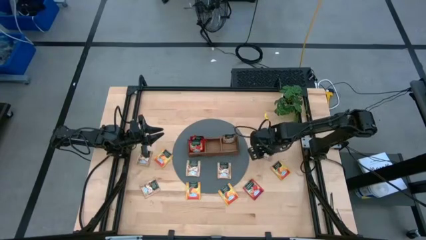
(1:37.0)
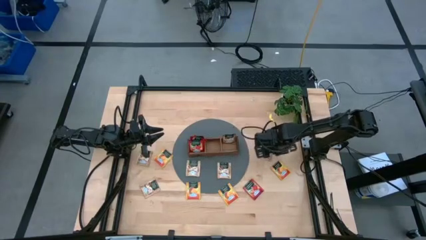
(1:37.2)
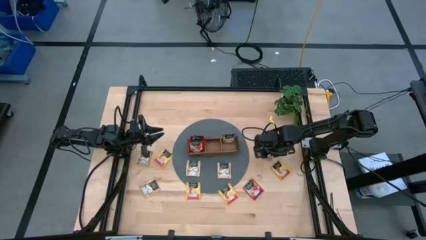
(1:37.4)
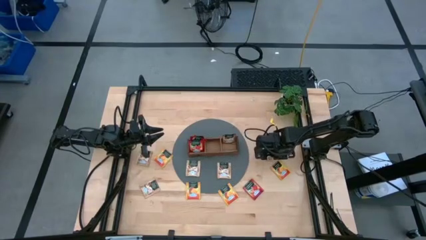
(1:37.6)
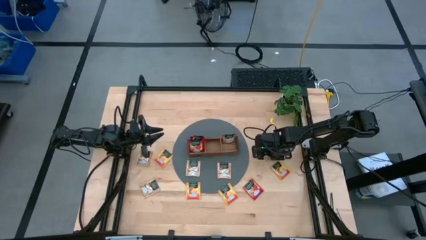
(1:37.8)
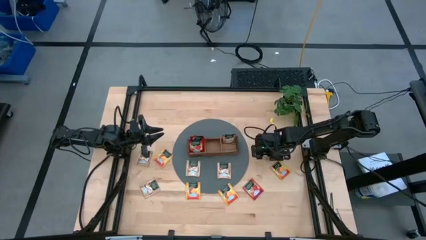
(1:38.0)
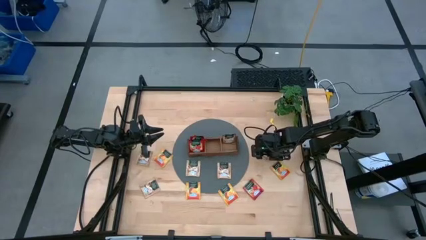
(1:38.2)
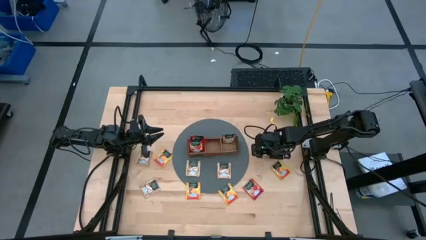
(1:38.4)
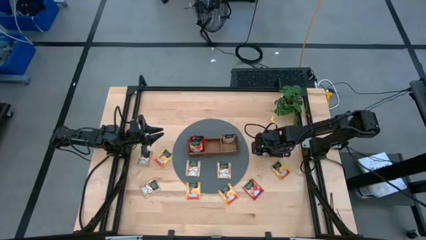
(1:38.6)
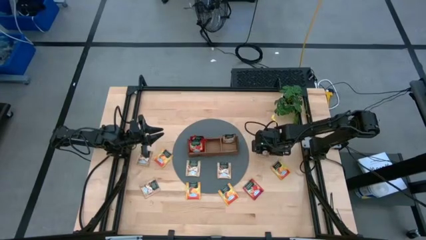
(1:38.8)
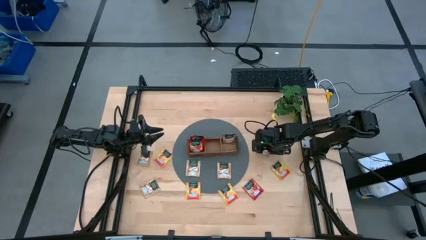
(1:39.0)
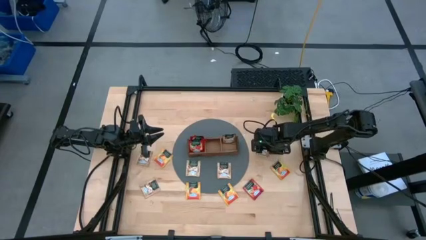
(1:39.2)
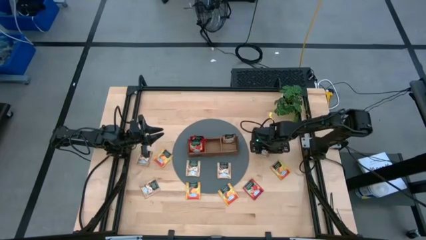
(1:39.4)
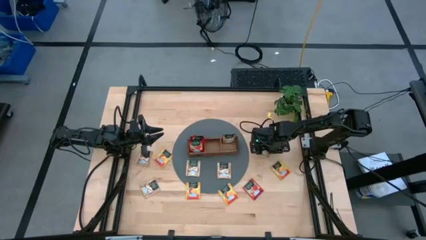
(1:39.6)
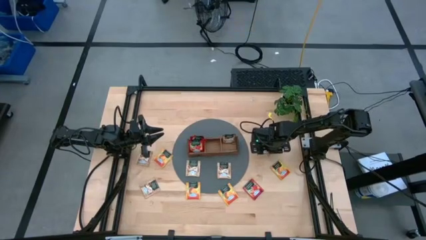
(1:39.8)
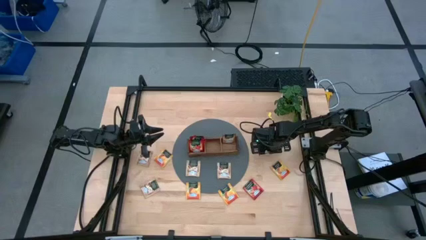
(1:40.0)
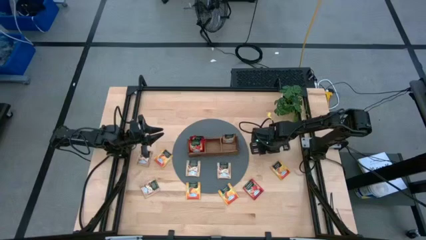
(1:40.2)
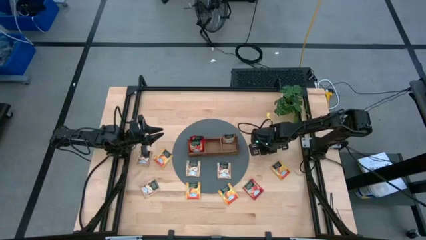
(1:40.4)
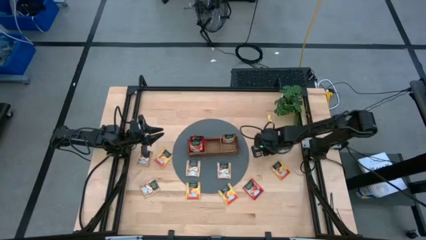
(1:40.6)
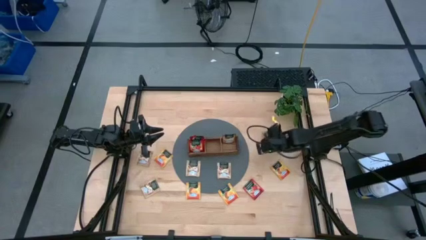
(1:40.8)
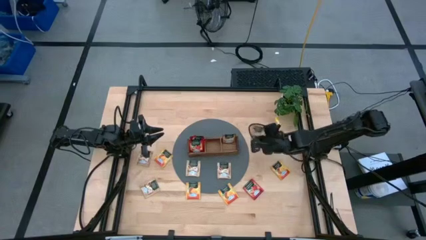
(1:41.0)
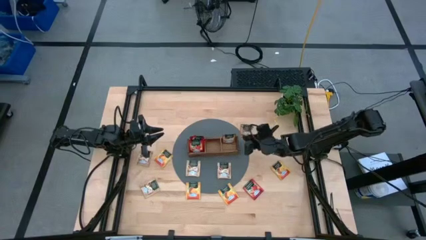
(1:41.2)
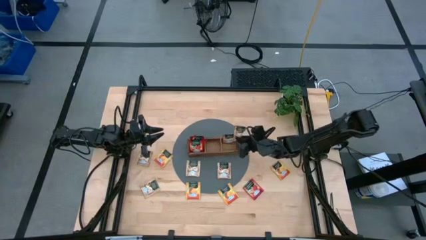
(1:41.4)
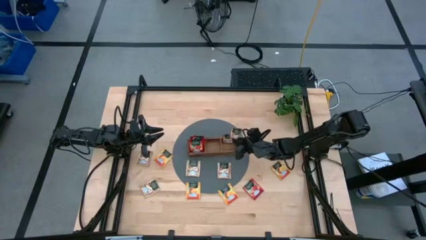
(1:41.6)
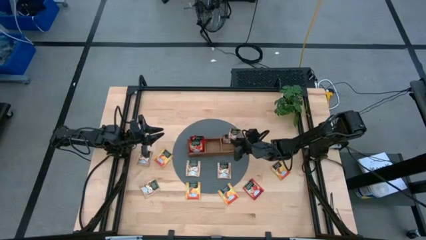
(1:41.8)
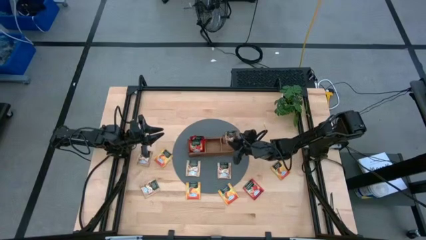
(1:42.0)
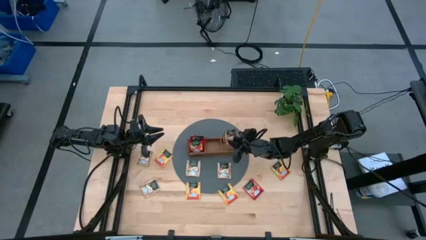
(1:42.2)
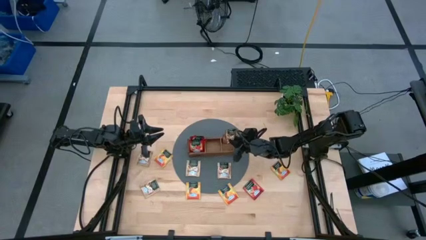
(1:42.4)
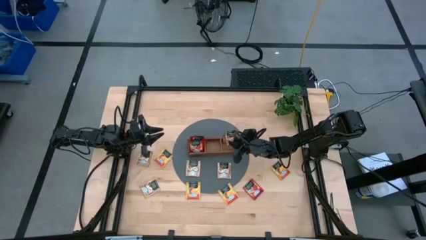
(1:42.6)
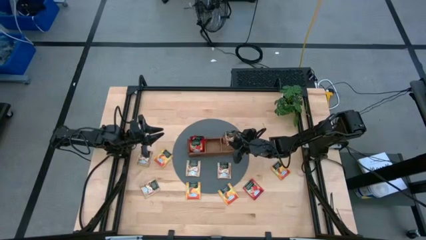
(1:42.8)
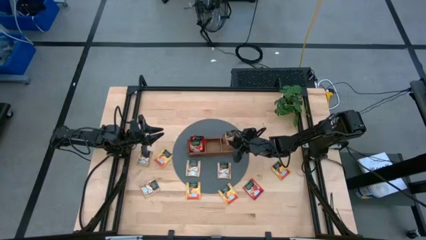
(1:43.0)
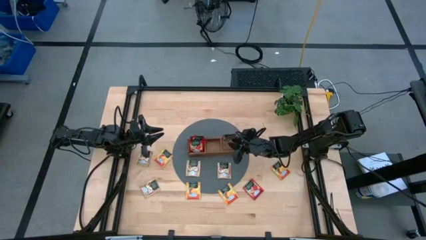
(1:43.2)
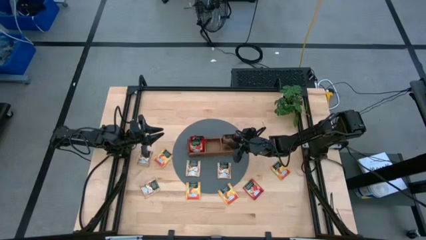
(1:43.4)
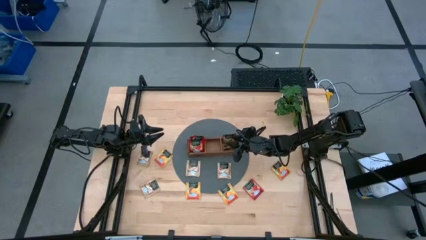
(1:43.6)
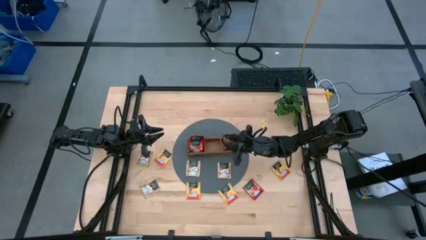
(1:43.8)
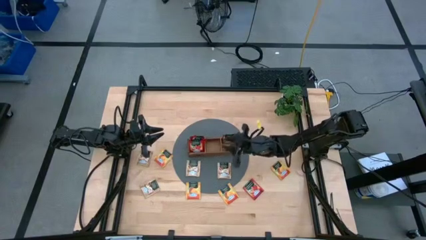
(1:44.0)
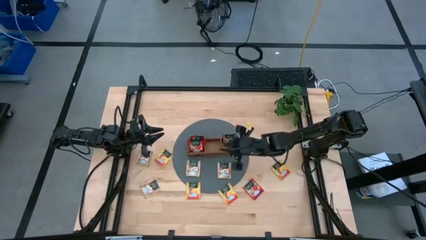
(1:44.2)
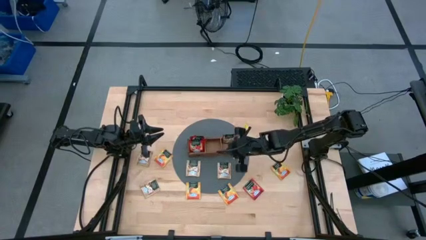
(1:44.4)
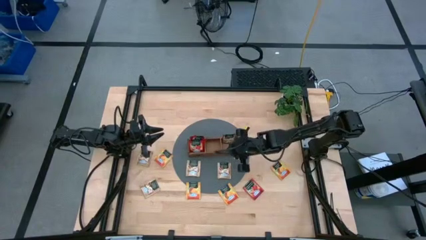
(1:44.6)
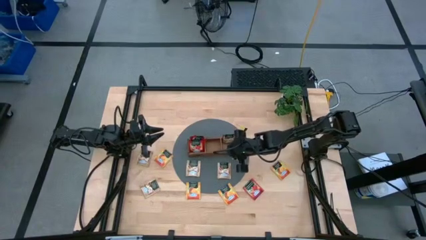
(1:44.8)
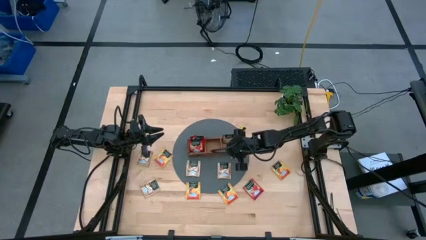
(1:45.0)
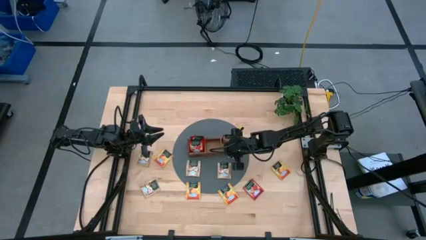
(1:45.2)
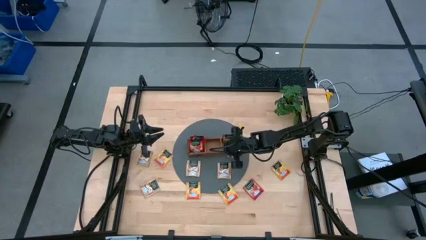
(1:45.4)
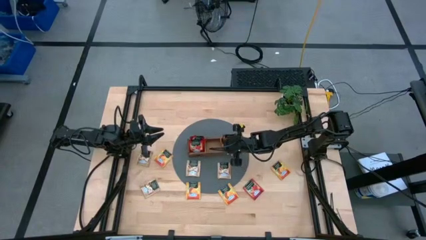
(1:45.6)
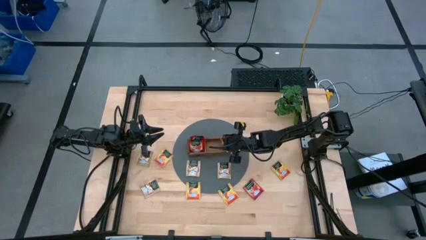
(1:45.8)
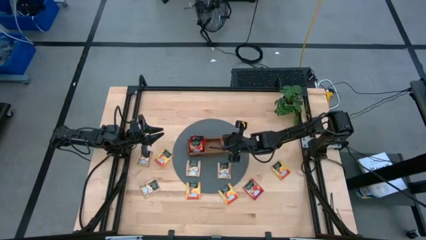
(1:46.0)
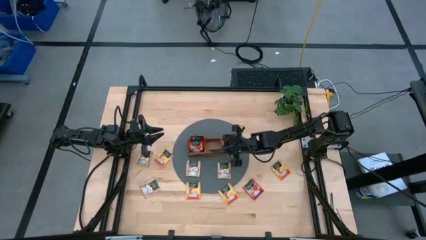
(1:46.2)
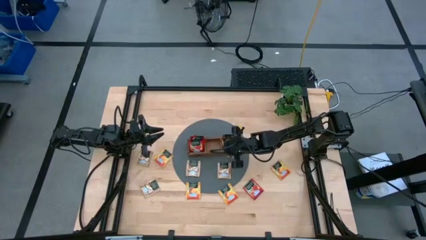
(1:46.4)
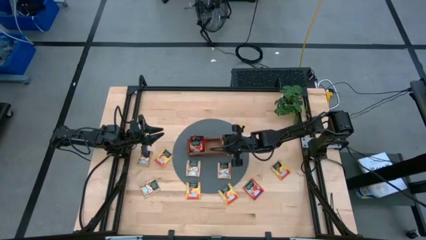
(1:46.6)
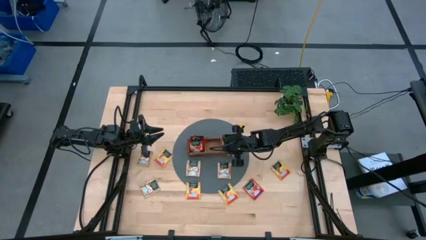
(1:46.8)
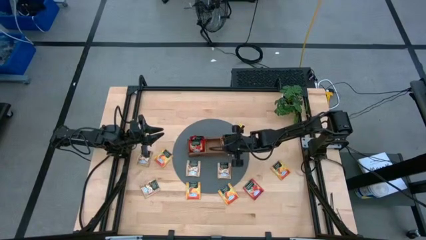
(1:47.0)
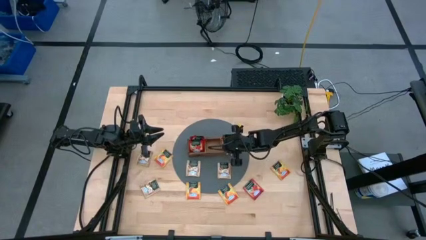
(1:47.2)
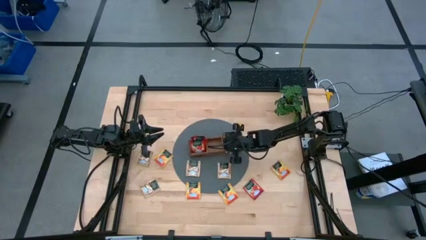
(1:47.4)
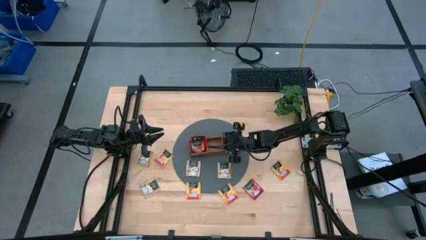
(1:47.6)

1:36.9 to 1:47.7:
Task: Pick & Place Tea
Put the yellow tea bag into the right section of the wooden organizer

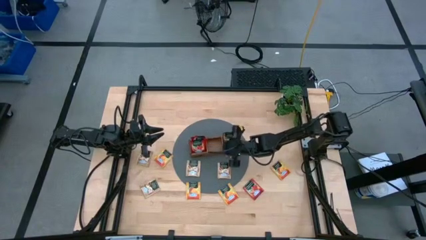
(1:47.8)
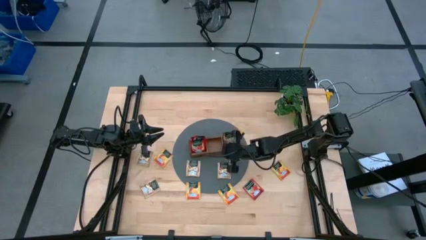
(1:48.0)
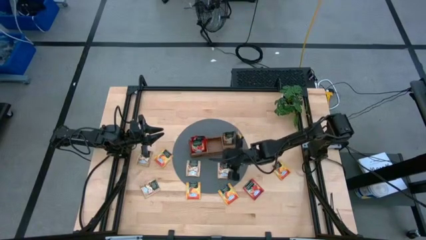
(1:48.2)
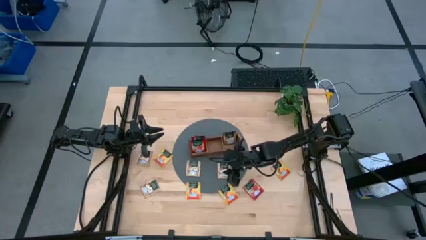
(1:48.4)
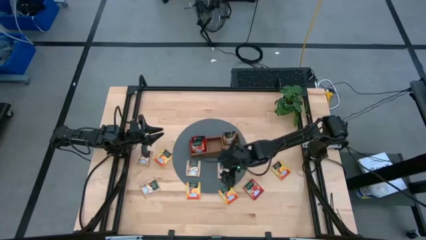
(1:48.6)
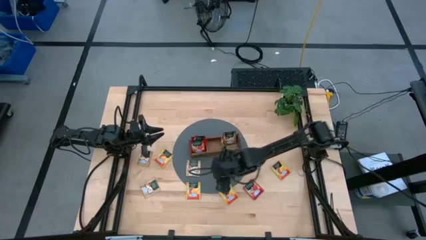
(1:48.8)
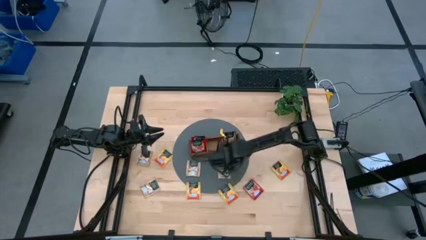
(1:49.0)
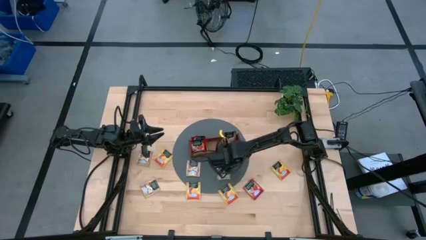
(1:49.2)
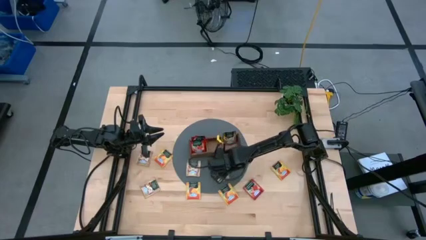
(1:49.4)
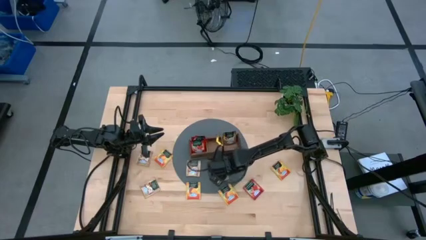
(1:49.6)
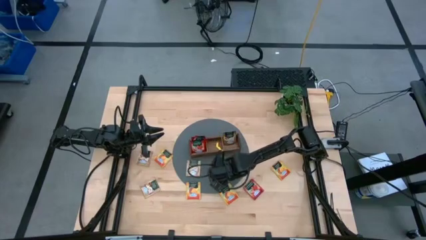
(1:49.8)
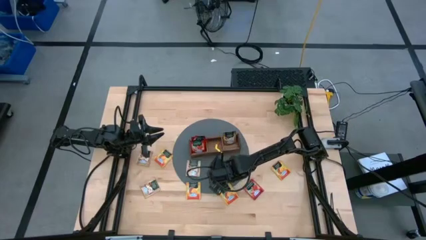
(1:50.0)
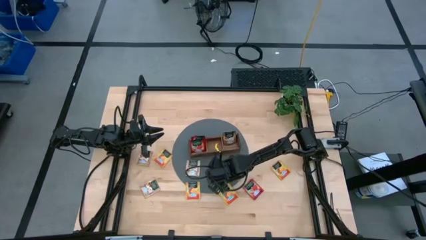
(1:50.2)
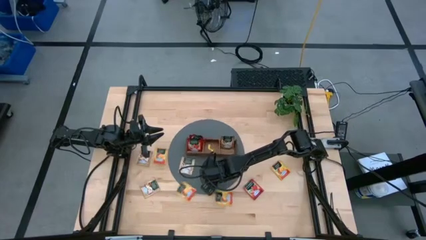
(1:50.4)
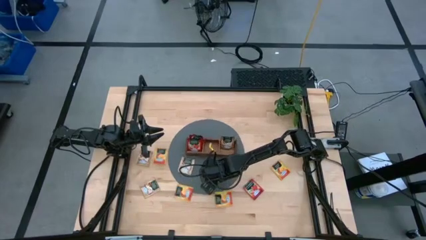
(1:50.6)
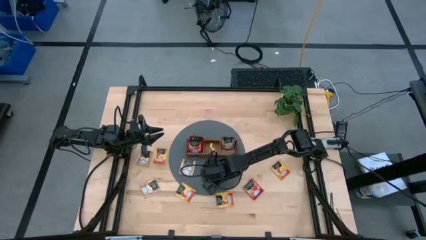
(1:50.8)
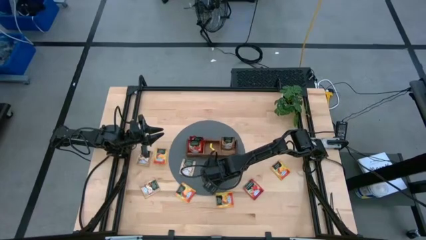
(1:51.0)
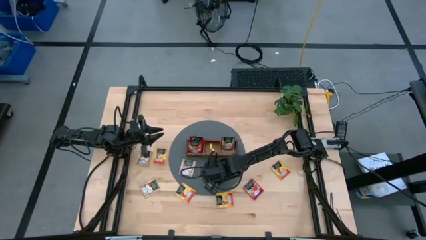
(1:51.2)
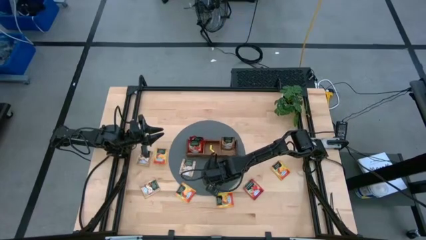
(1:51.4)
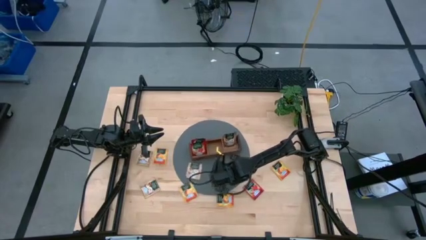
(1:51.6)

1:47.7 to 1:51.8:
Put the yellow tea bag into the right section of the wooden organizer

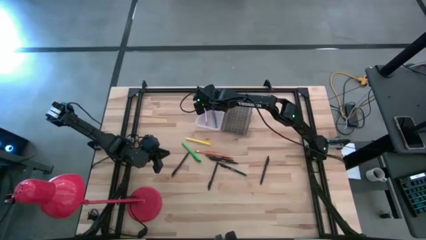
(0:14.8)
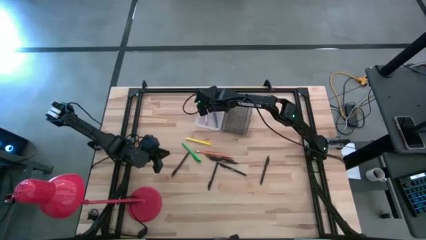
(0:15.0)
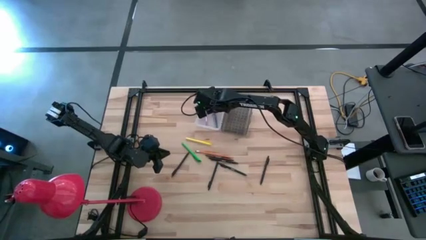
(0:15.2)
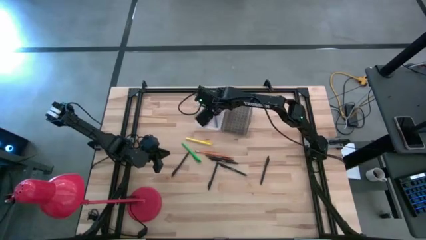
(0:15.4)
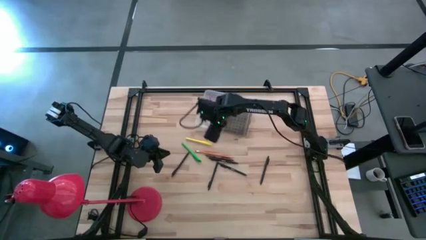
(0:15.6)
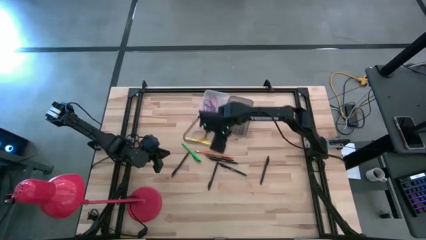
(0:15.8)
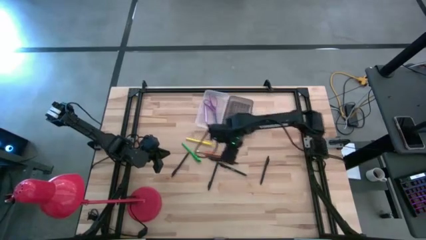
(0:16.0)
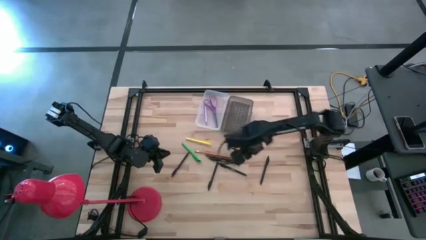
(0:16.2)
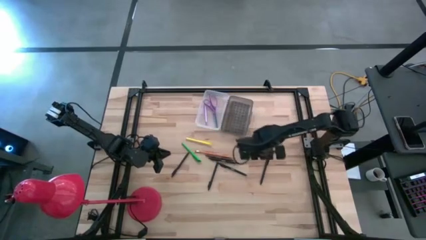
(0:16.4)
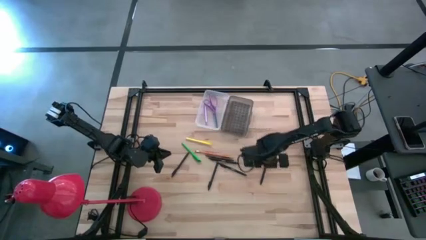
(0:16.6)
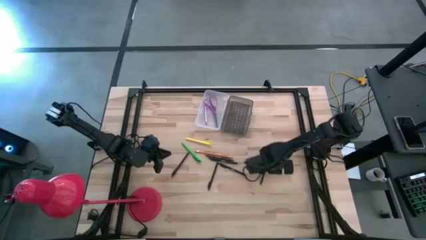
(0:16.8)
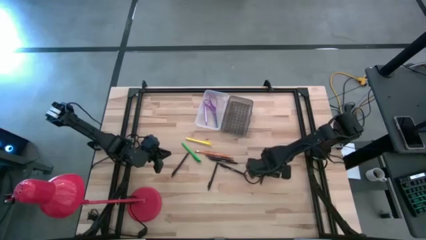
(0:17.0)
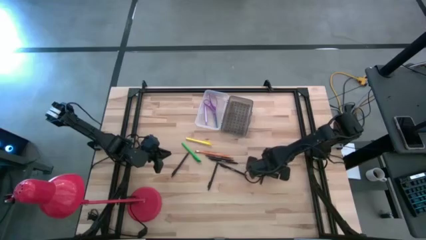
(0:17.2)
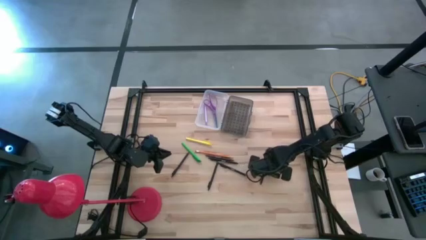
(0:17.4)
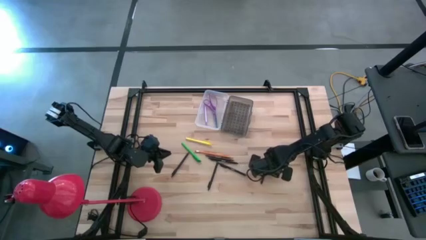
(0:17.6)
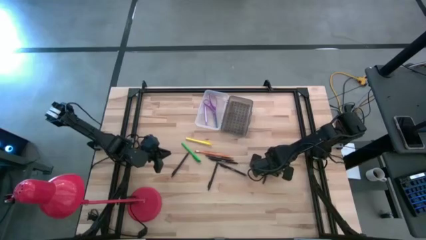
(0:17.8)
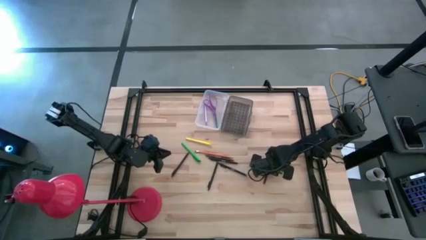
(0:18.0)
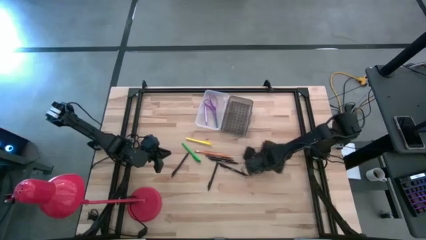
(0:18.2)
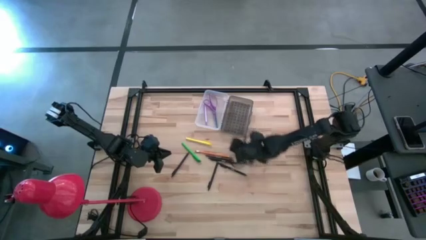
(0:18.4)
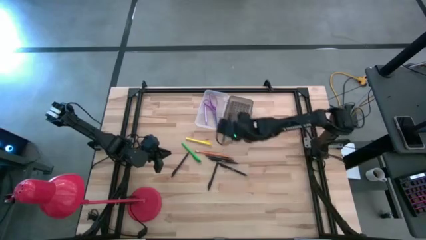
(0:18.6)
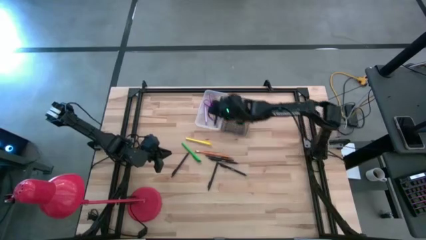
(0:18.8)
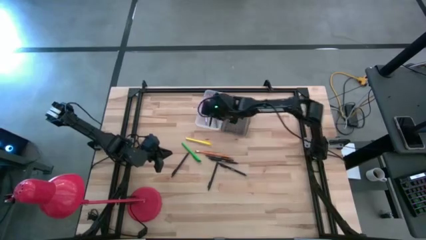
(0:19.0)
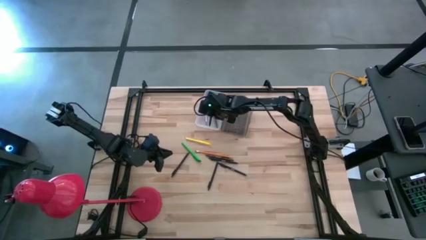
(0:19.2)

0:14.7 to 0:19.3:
Task: Pick & place school supplies into a supply box
Put the black pen into the transparent supply box
